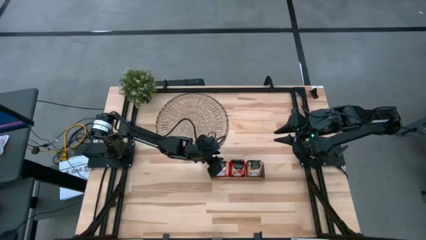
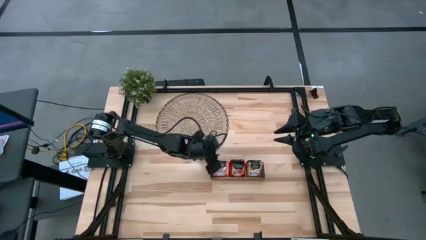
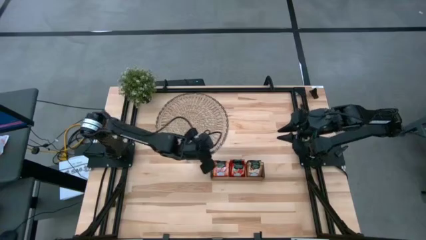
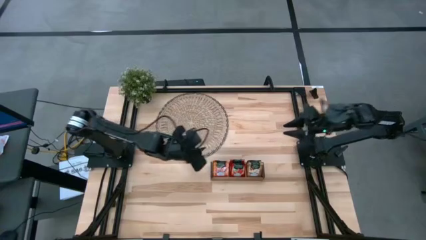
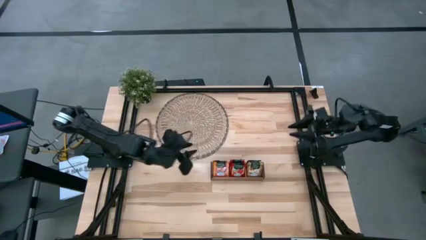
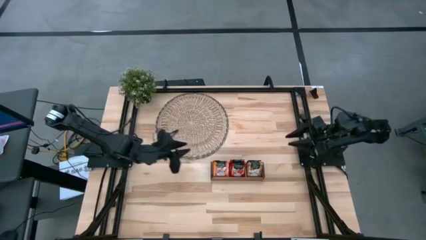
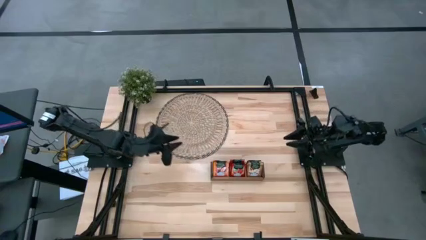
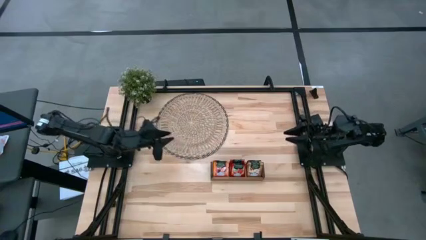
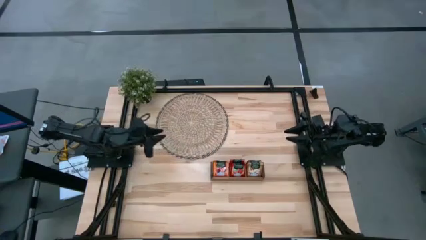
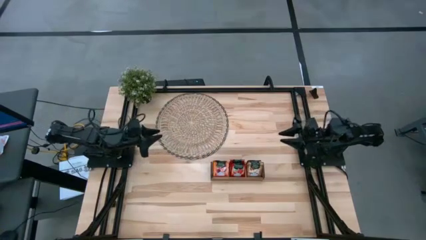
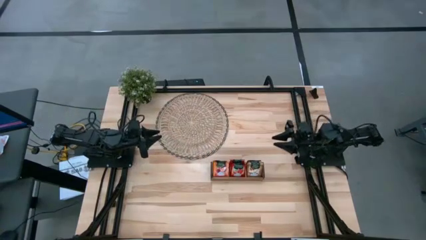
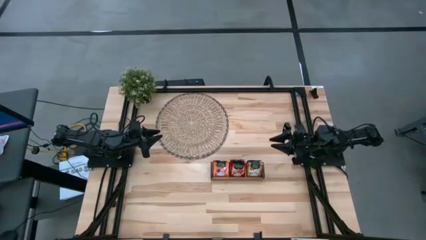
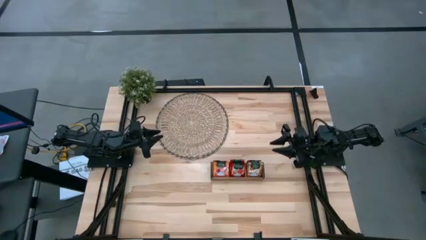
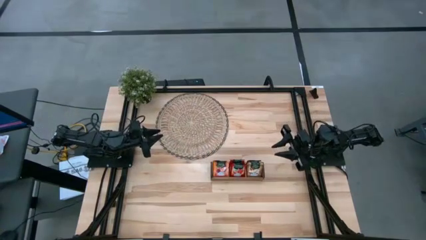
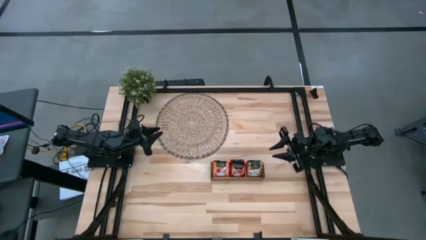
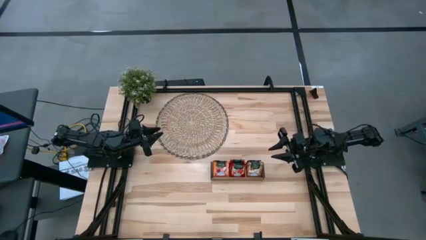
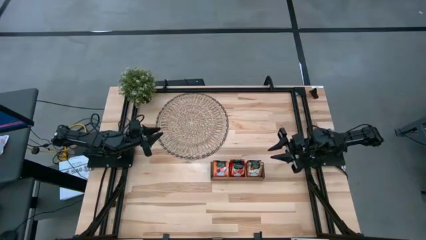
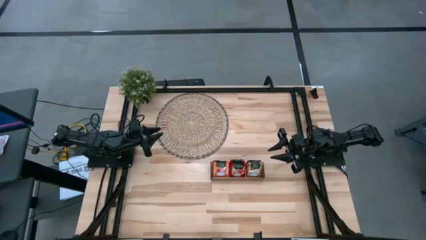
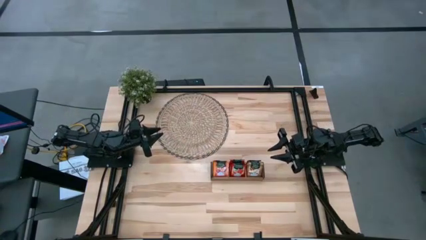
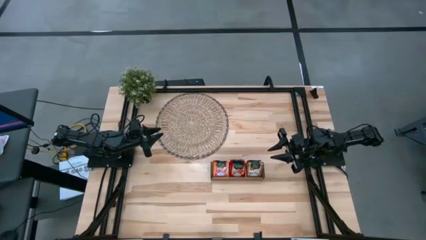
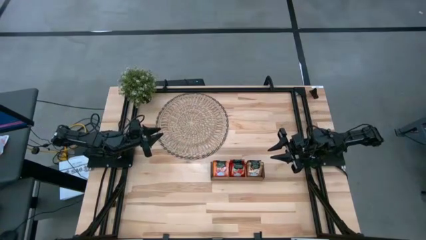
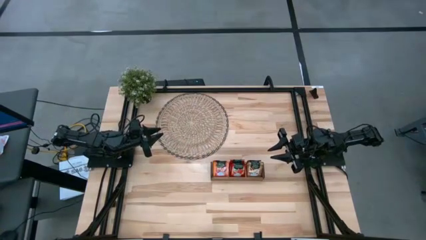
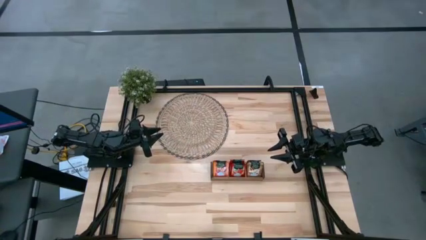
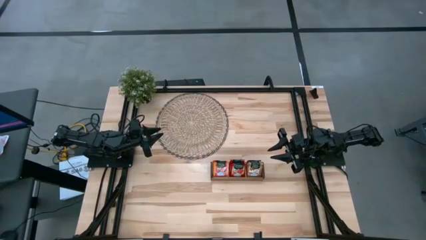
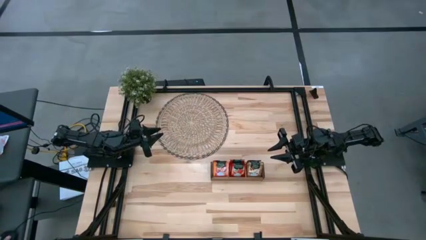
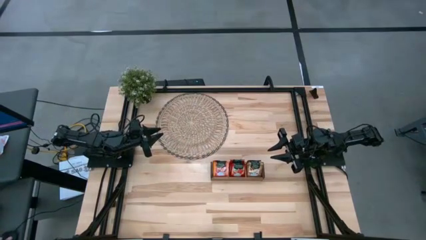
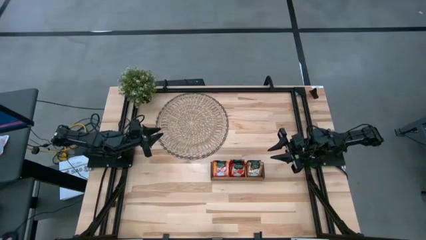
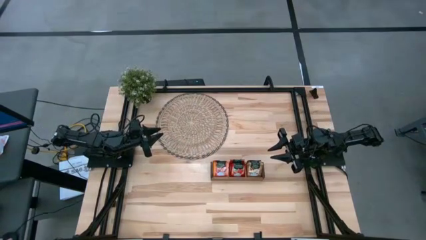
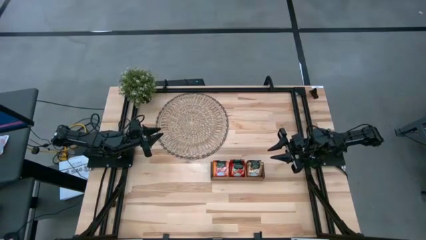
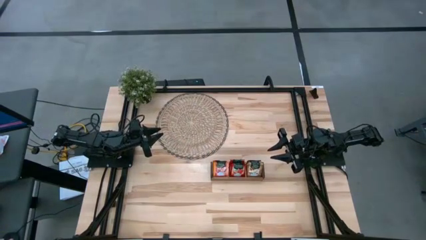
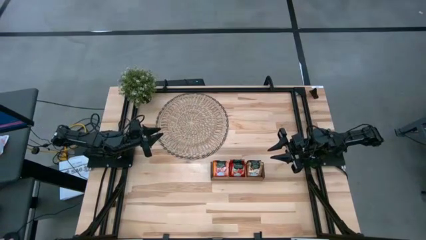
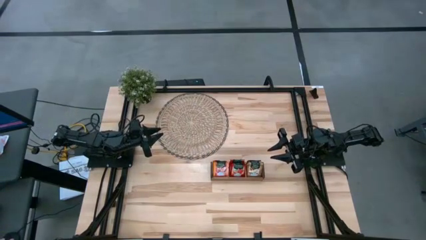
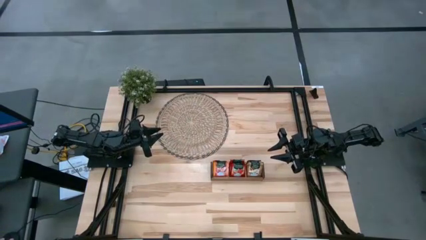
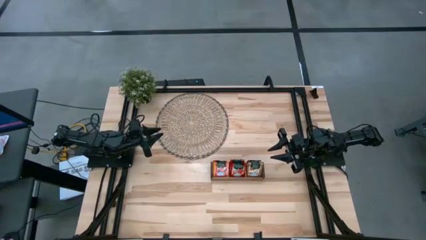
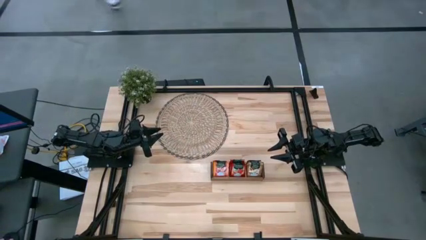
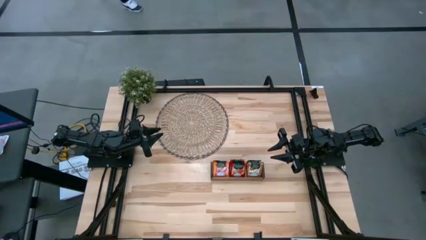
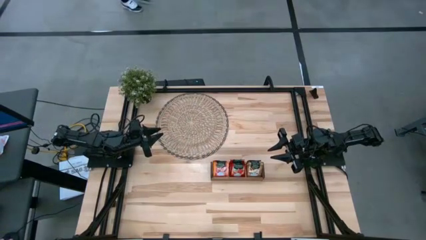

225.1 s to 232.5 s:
Task: Pick & Place Tea
Return to Home Position

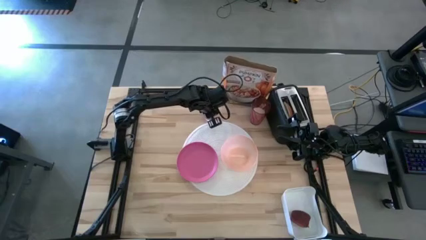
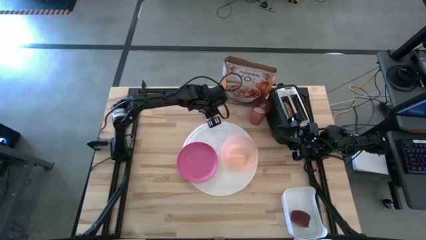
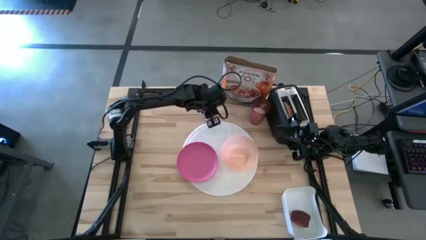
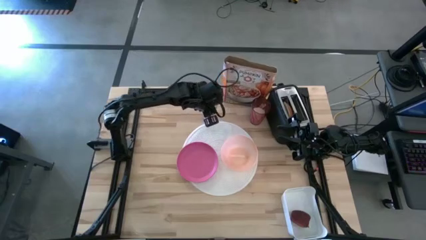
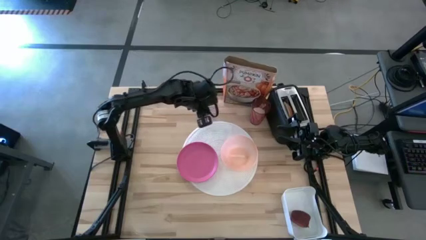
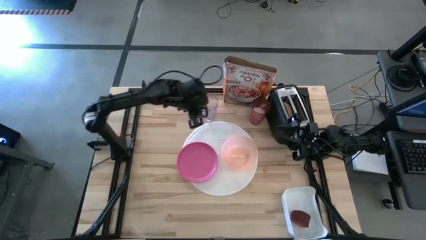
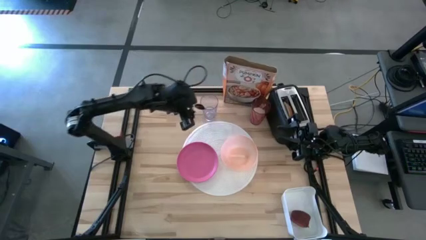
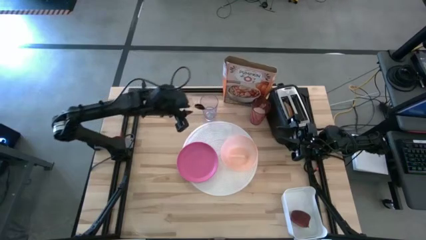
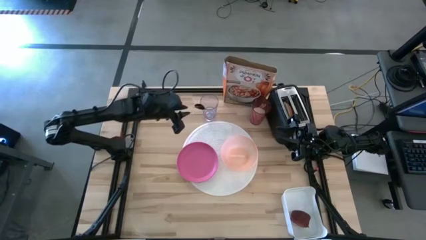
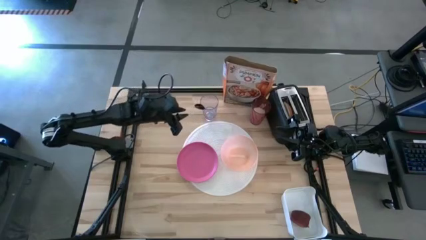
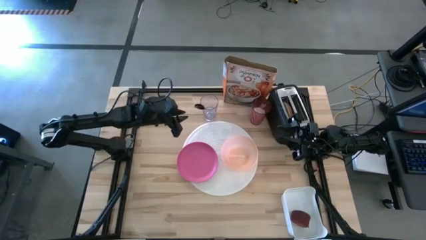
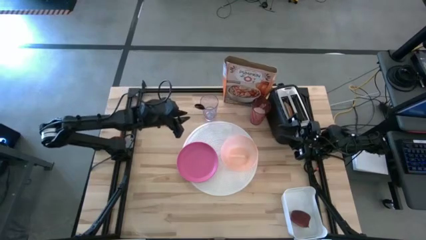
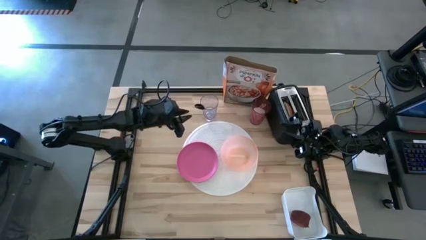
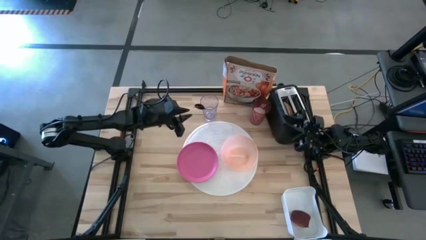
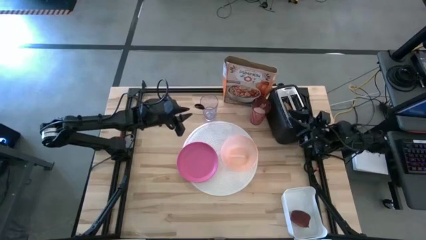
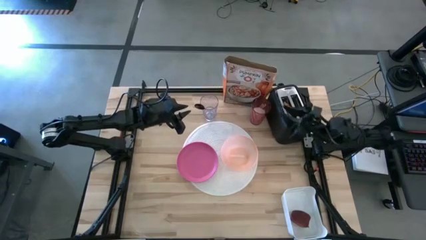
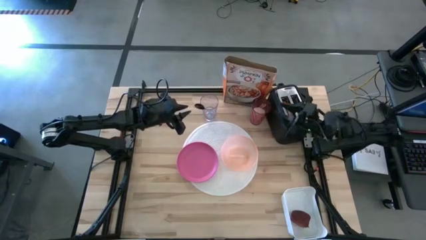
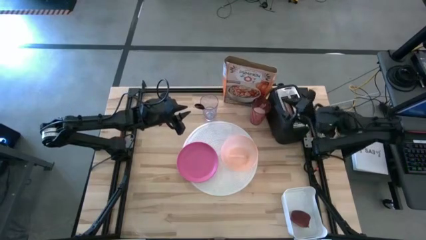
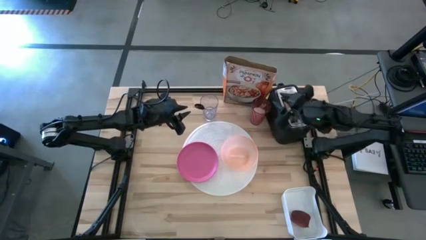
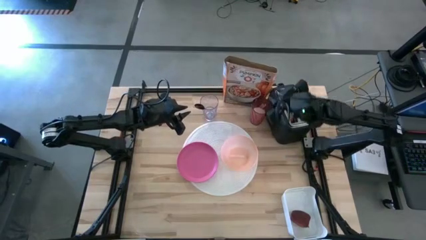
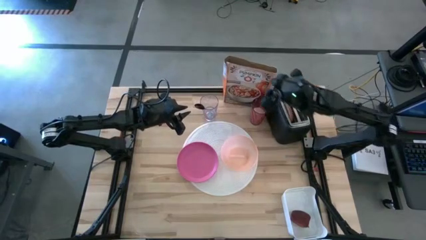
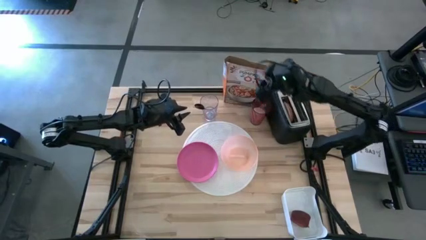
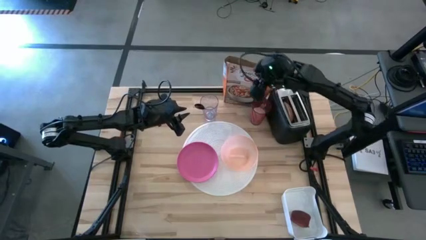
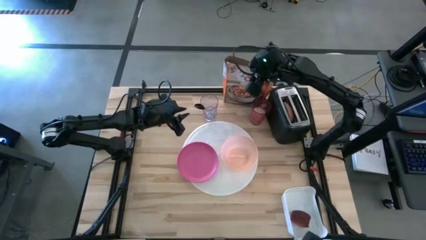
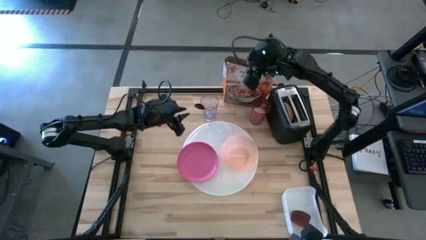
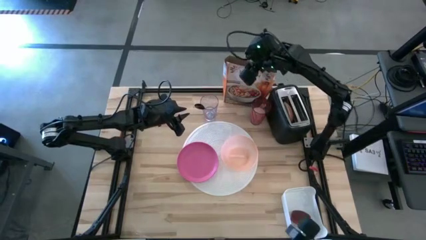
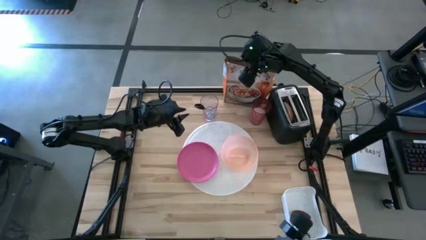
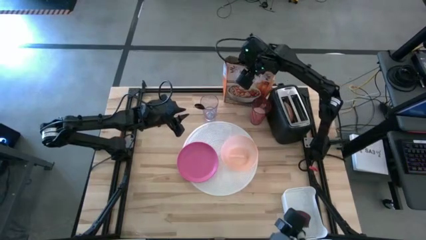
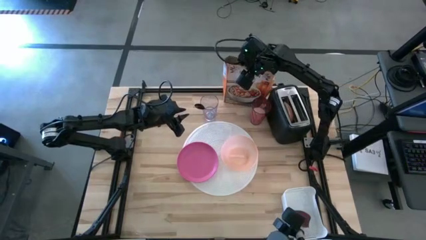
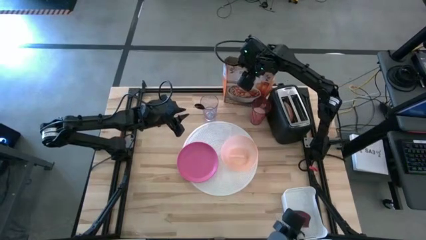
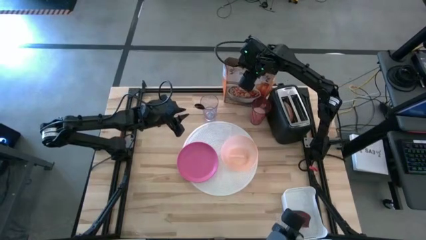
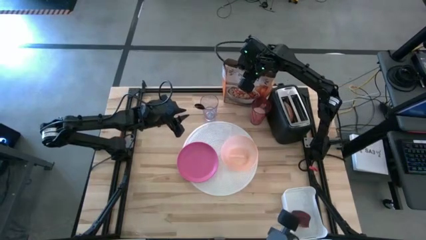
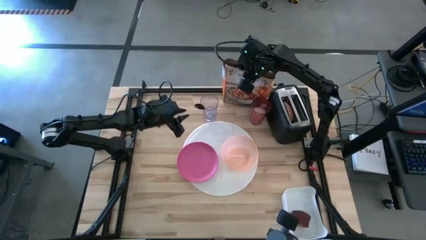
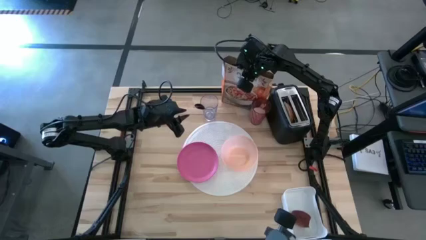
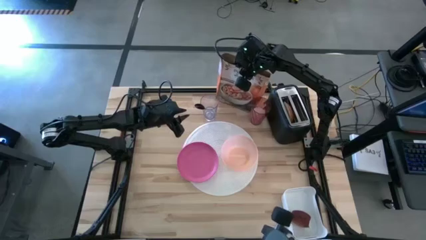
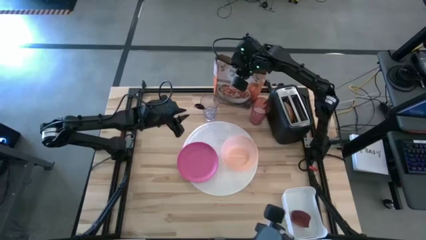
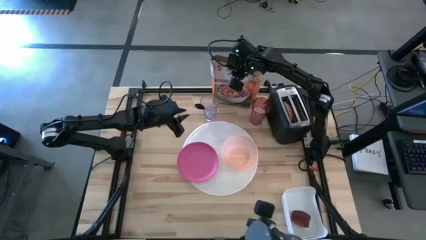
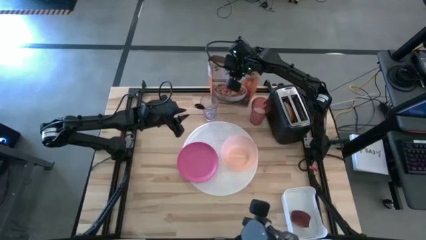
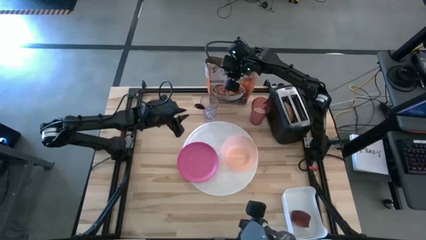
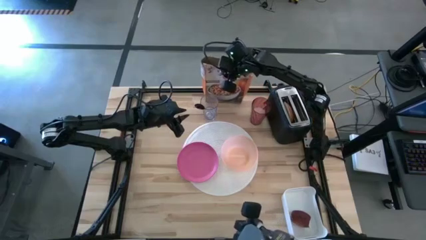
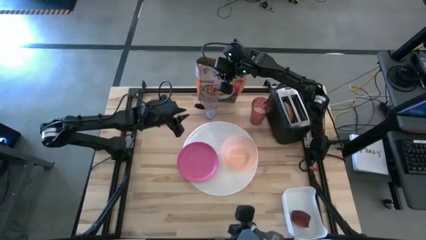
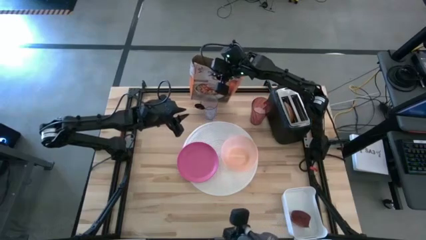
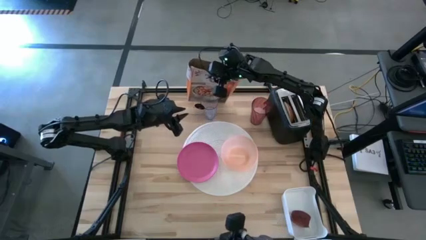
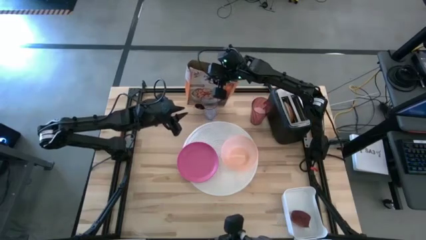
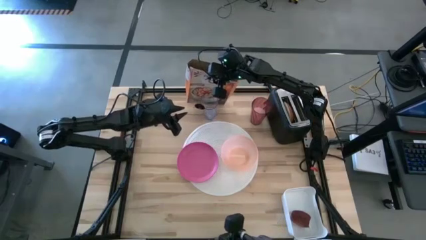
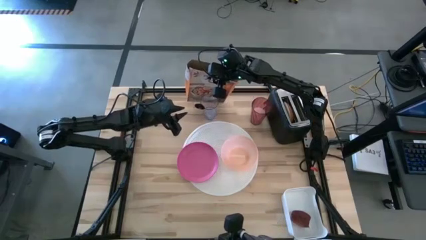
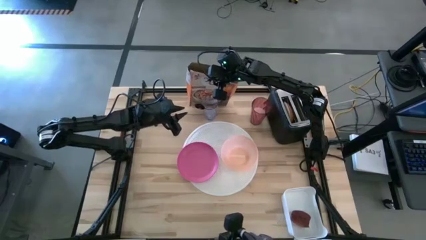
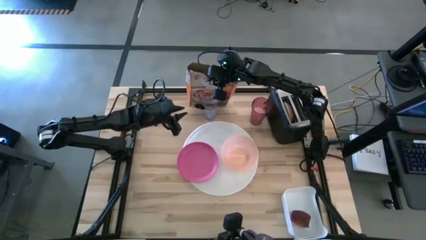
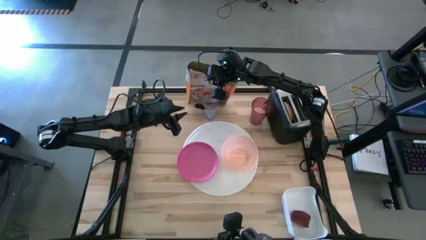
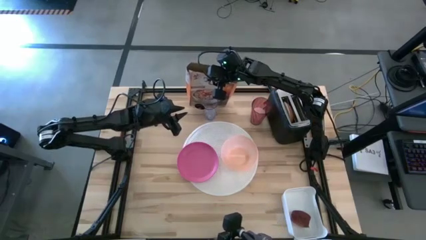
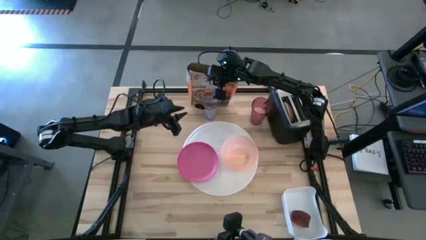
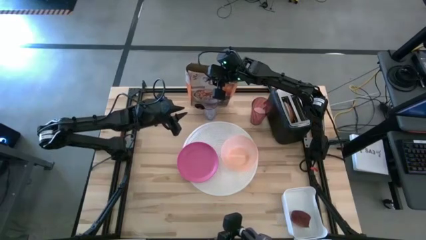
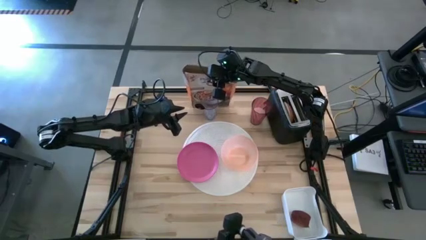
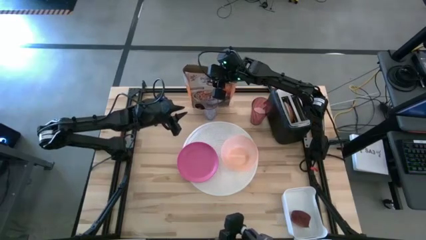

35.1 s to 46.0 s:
Task: Arrange a breakfast setting
Move the cereal box on the top left of the table
